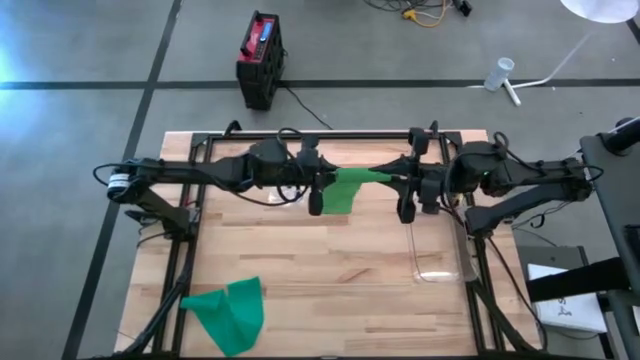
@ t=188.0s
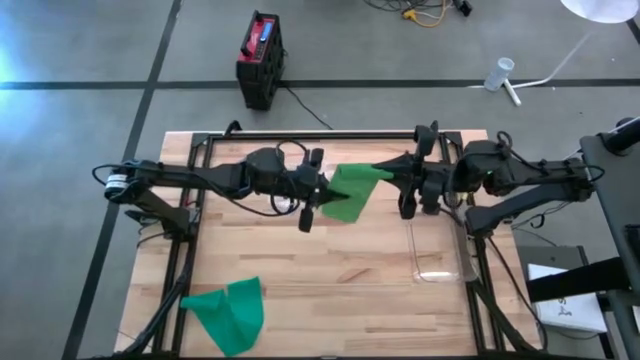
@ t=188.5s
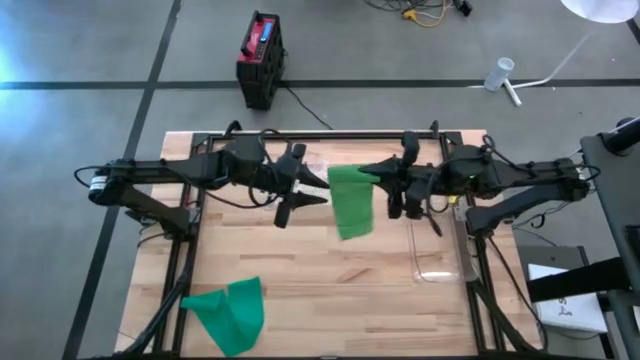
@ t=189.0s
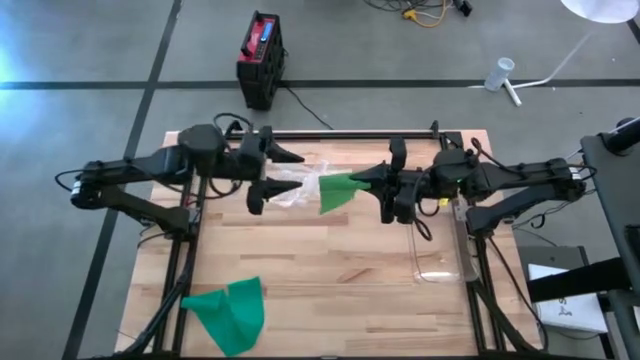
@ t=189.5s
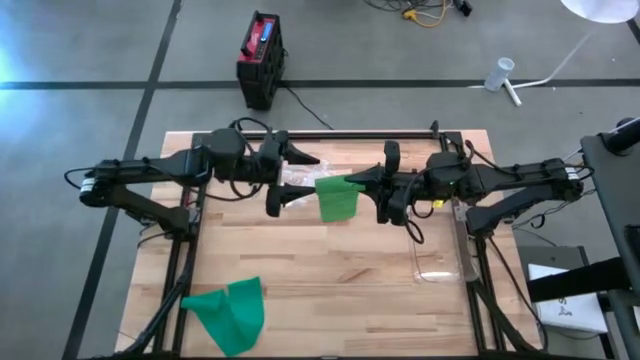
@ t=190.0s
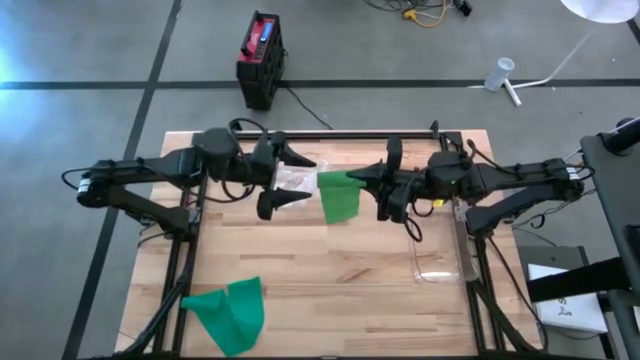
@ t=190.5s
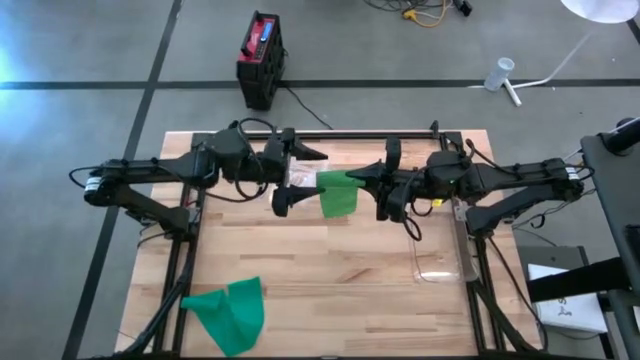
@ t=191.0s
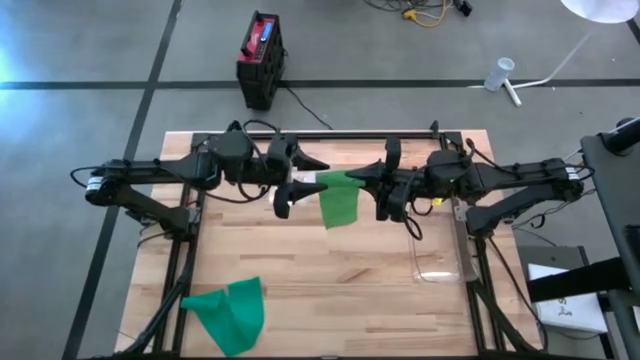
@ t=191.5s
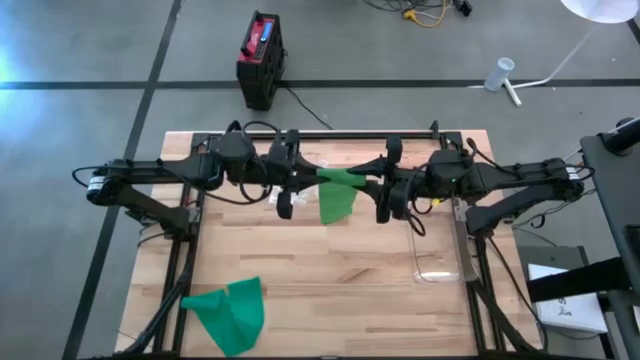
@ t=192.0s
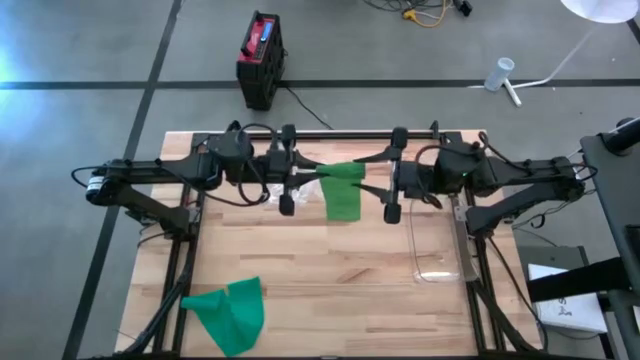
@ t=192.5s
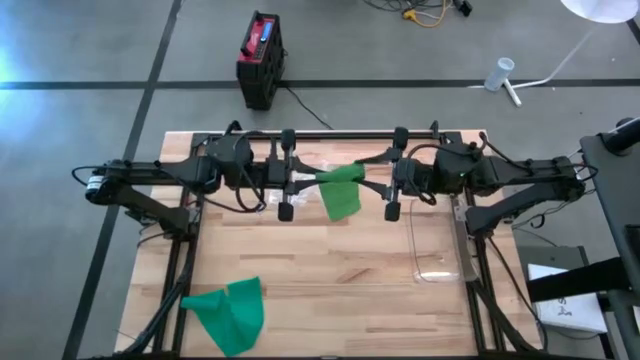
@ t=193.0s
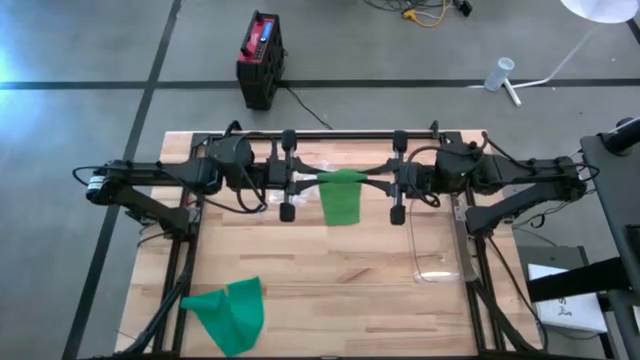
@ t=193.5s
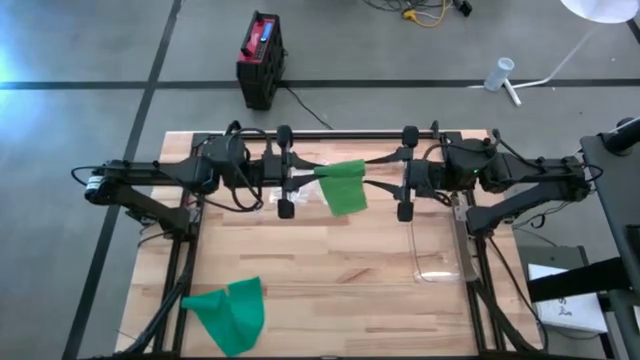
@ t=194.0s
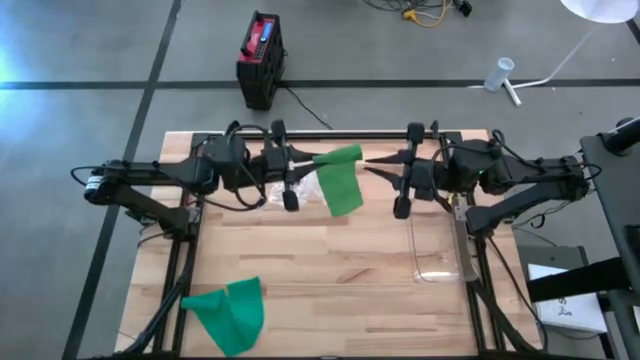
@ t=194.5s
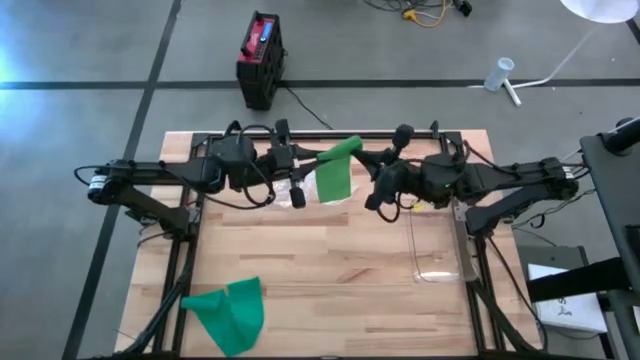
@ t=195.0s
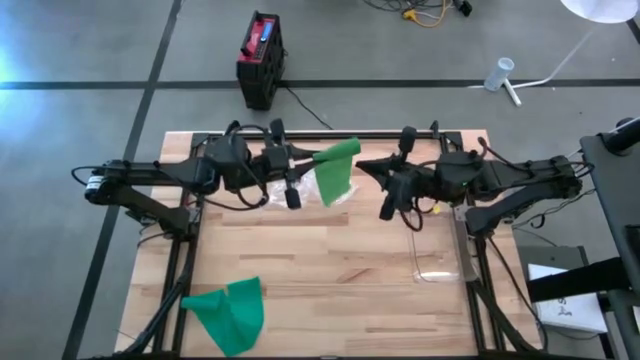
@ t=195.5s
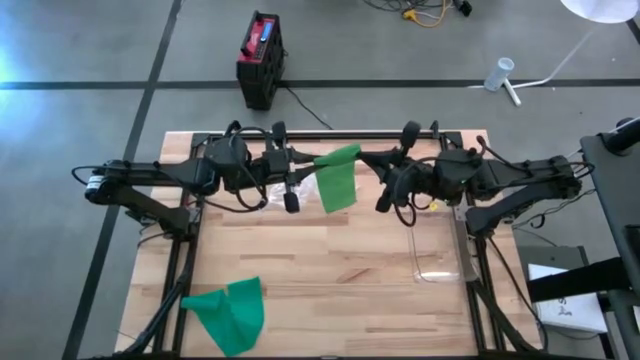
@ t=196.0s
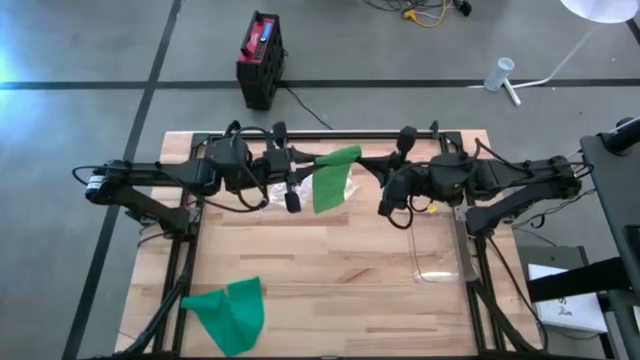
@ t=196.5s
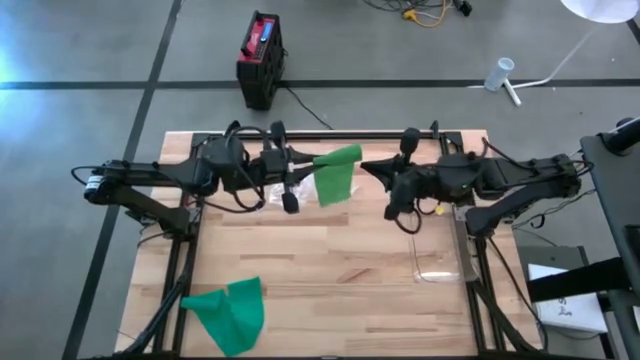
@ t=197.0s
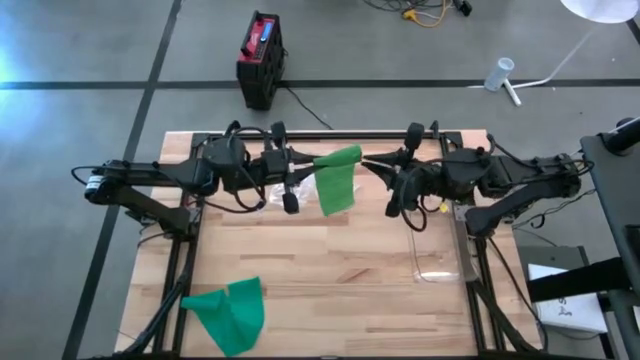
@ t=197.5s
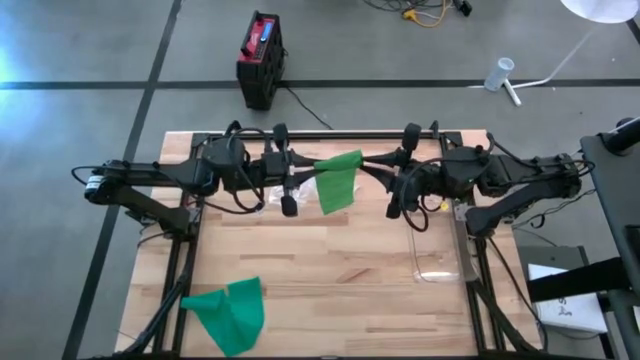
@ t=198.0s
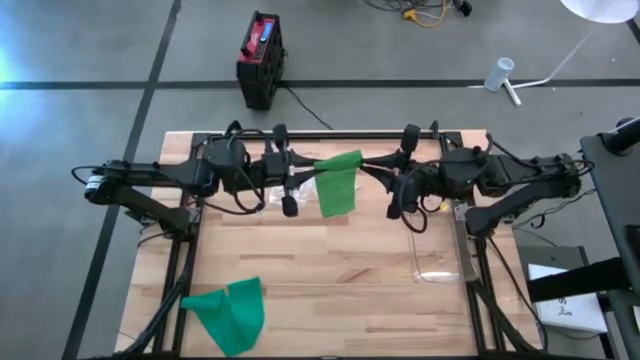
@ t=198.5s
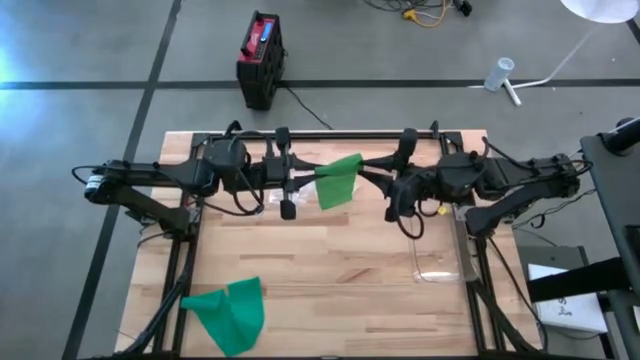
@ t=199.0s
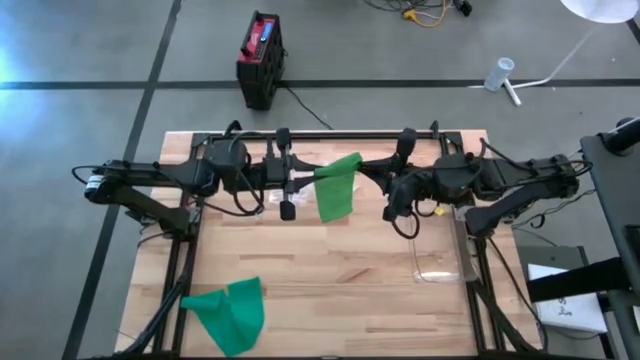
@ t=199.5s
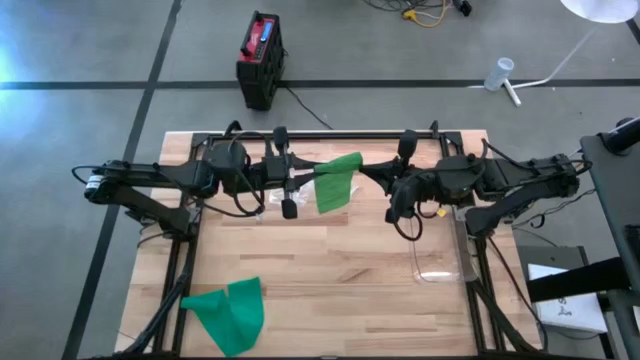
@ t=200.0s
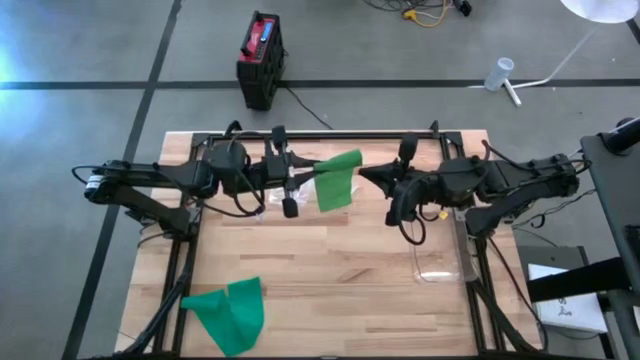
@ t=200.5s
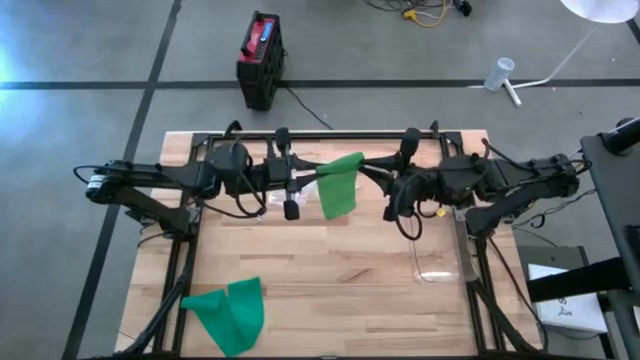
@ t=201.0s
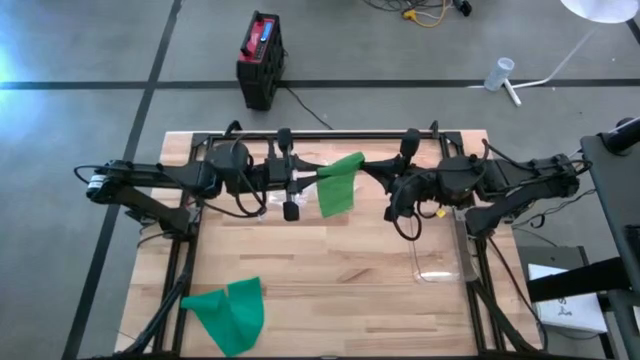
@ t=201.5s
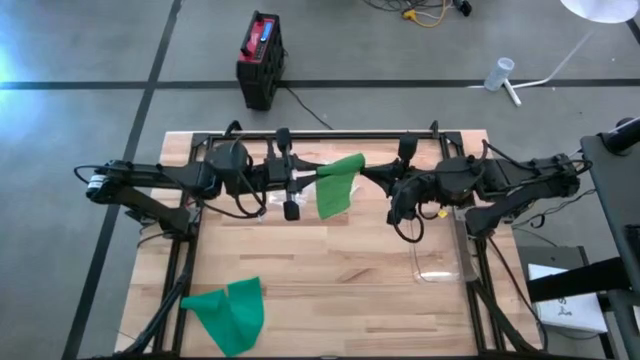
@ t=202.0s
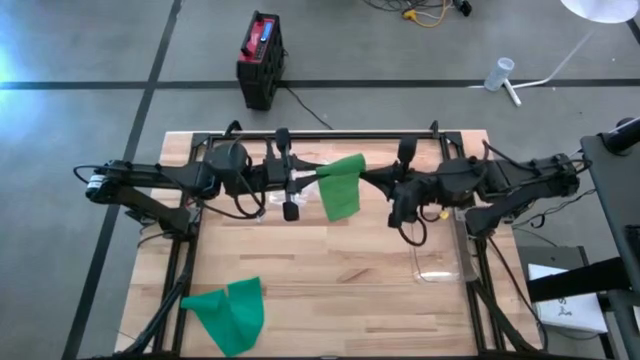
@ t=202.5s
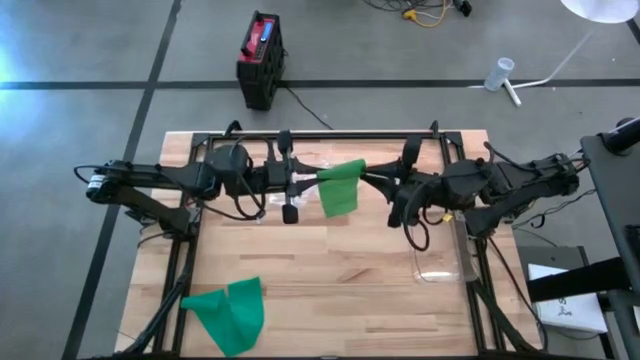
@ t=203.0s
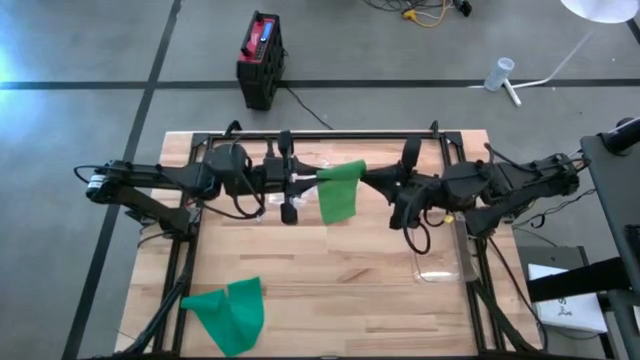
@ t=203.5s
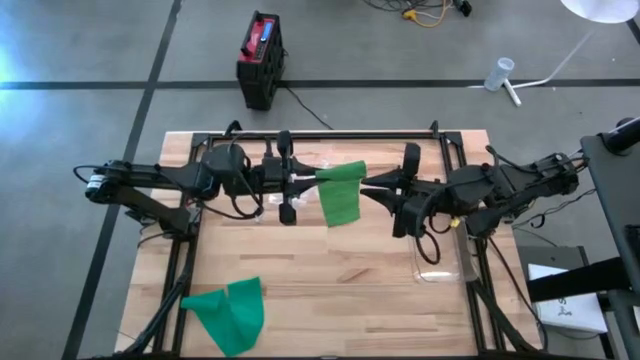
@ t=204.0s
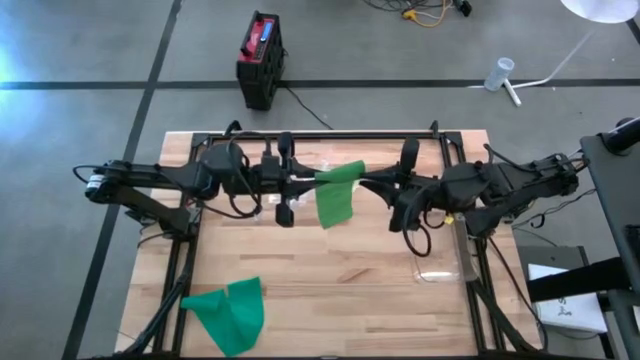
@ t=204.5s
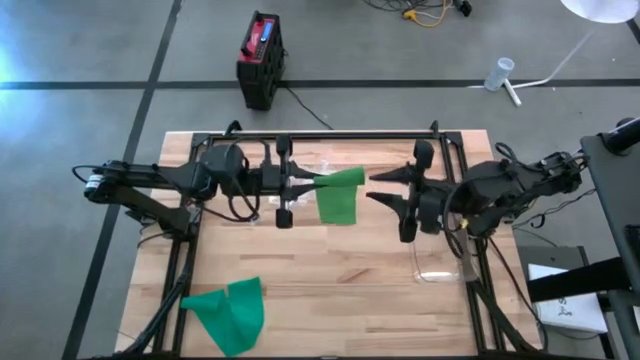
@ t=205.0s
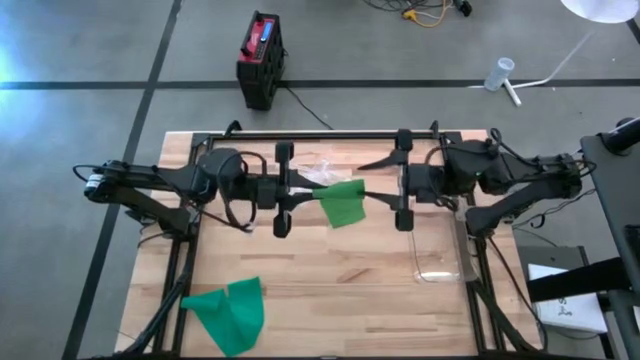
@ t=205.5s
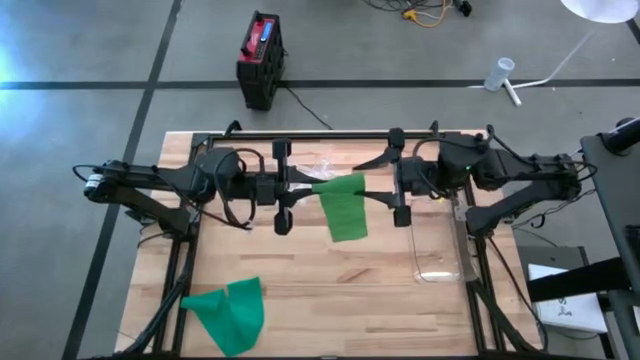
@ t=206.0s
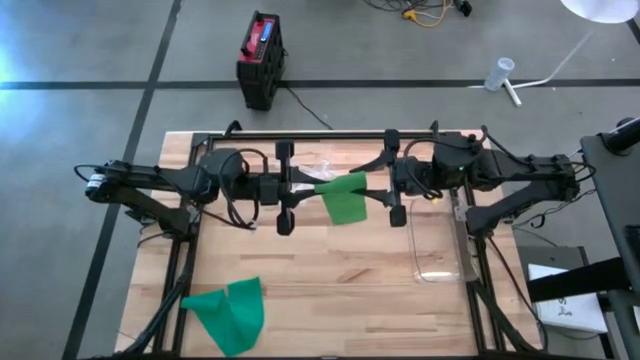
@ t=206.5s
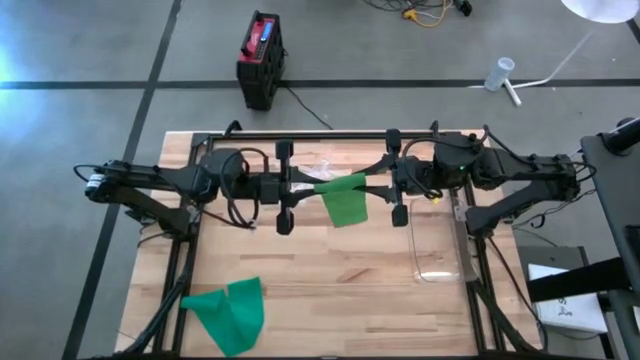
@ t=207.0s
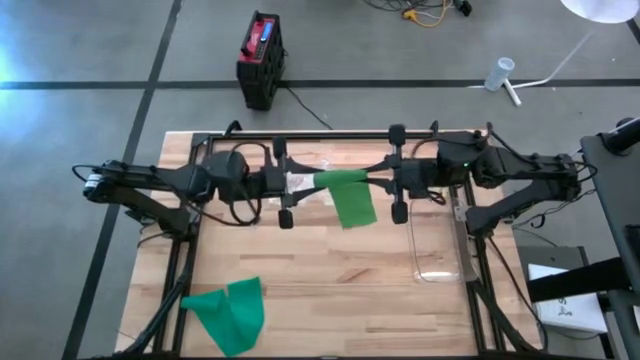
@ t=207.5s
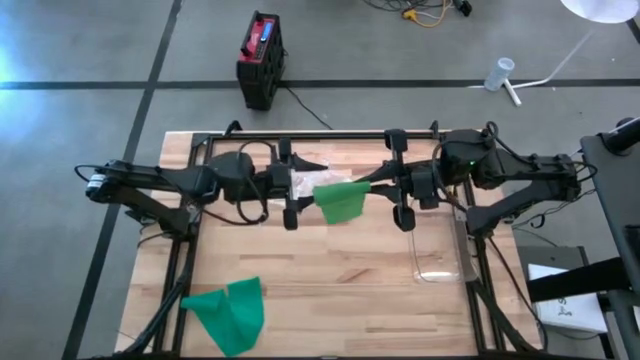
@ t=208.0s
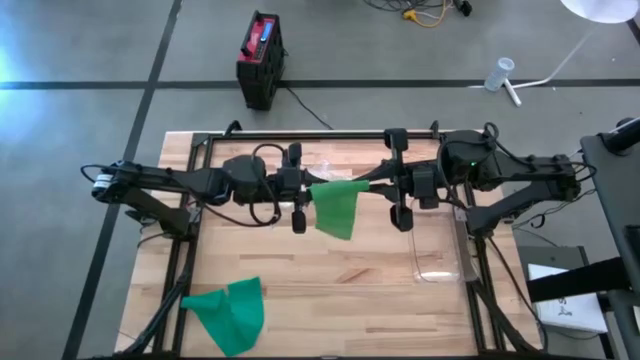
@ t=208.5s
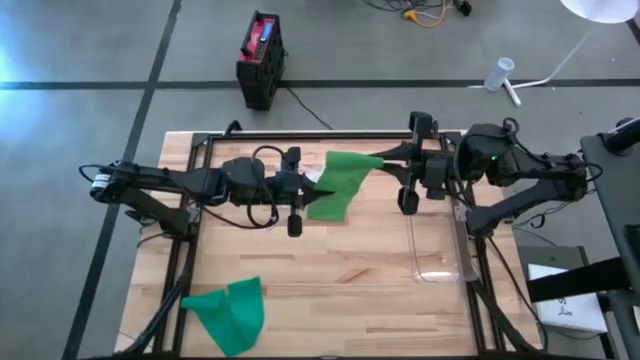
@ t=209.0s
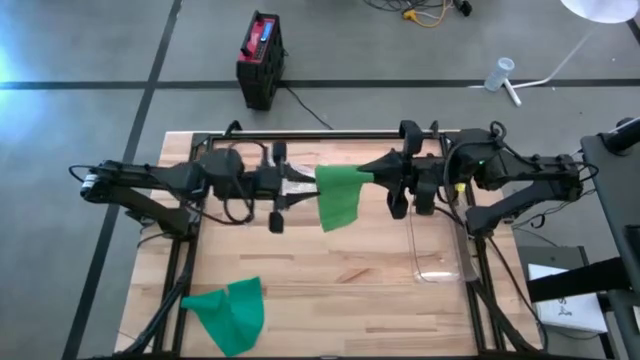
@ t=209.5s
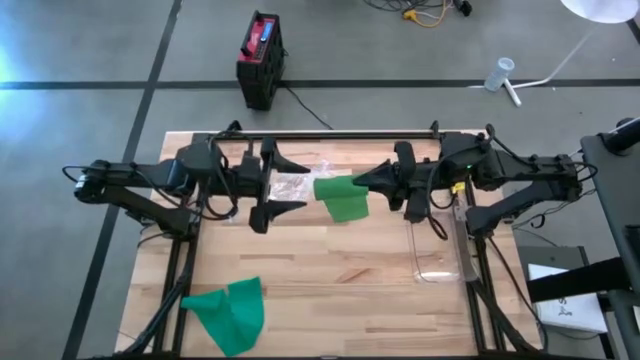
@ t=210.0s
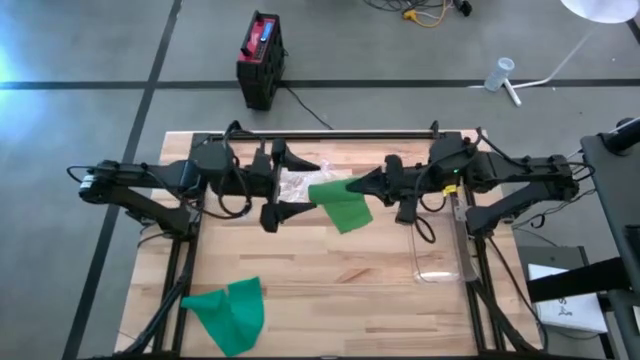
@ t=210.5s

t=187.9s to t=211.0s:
Task: Roll bandage
Roll the green bandage
